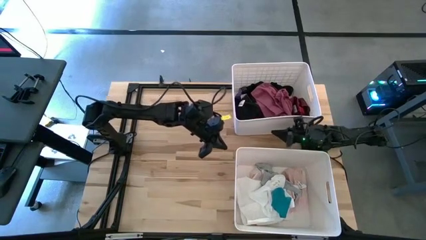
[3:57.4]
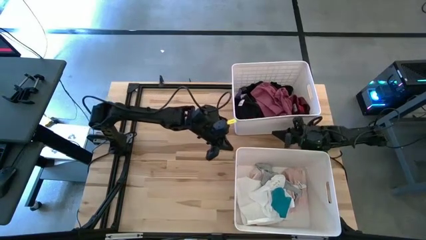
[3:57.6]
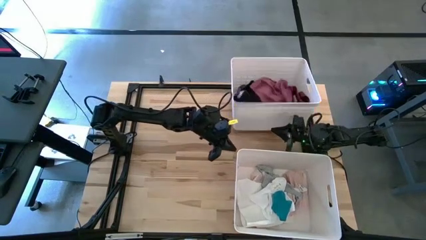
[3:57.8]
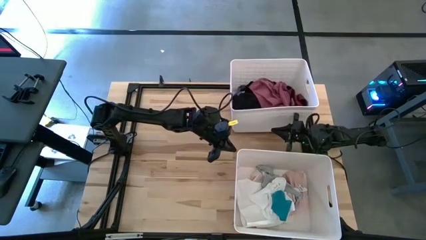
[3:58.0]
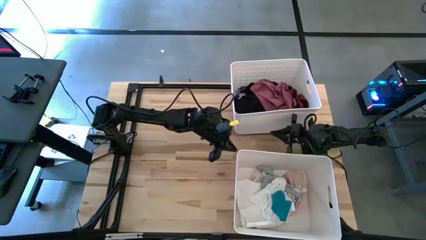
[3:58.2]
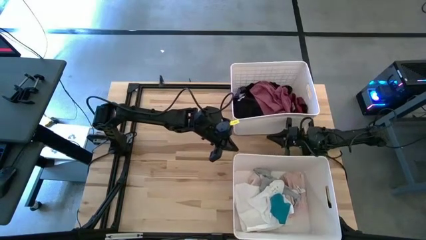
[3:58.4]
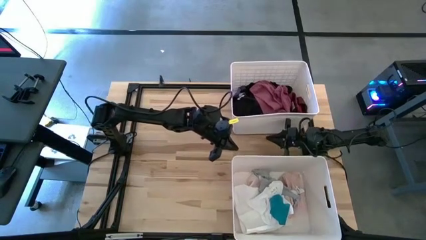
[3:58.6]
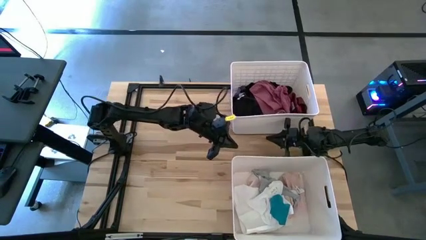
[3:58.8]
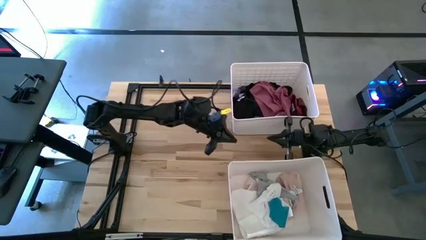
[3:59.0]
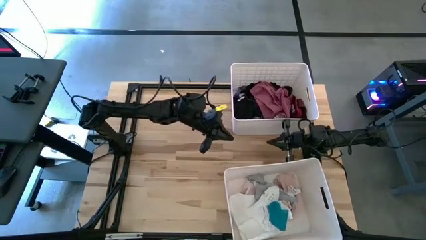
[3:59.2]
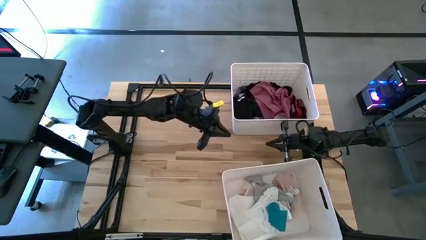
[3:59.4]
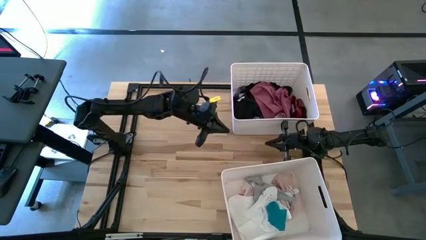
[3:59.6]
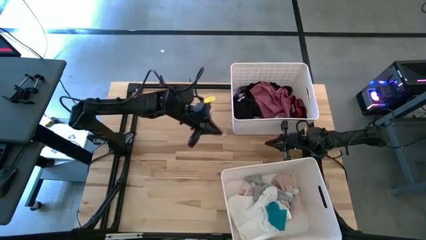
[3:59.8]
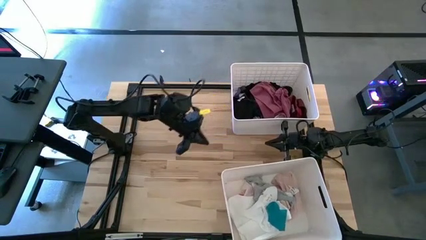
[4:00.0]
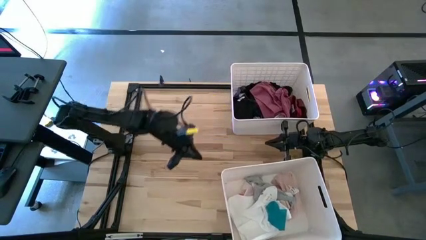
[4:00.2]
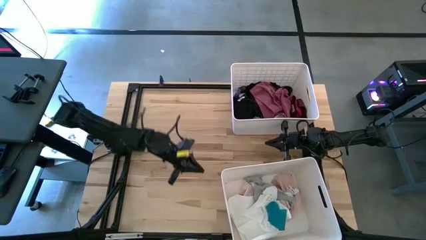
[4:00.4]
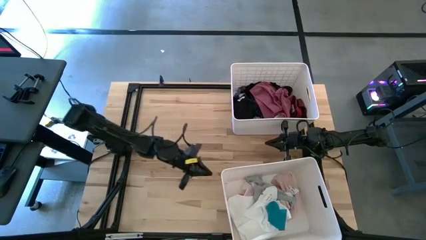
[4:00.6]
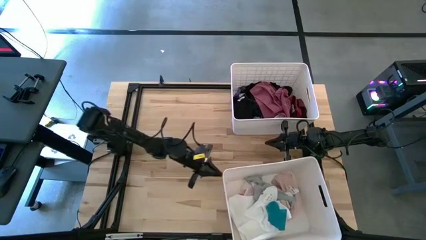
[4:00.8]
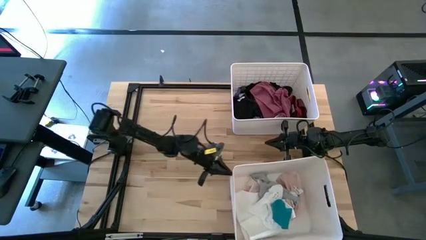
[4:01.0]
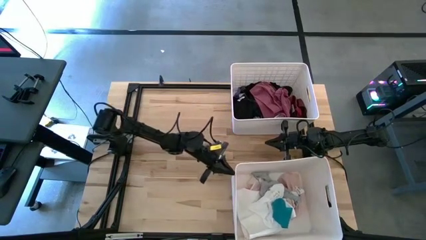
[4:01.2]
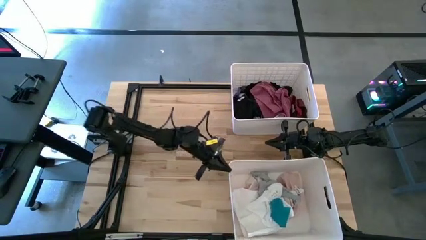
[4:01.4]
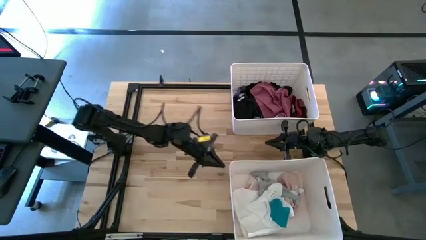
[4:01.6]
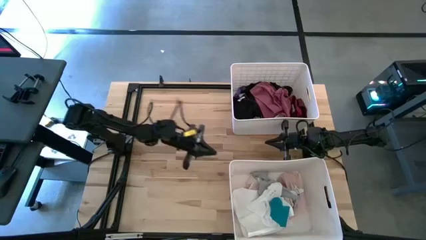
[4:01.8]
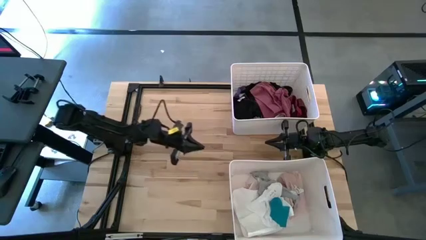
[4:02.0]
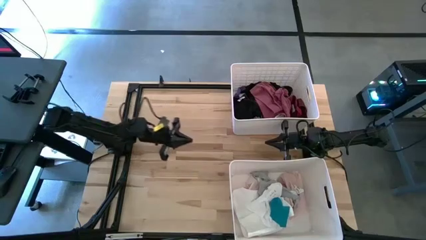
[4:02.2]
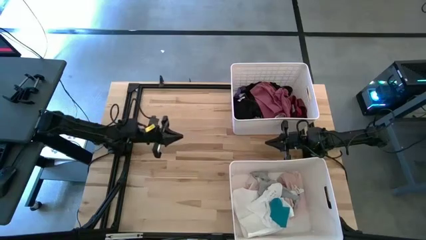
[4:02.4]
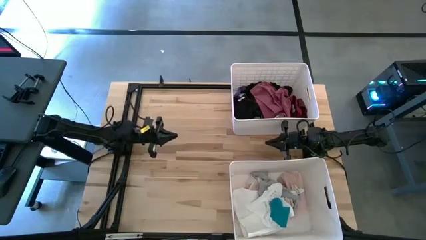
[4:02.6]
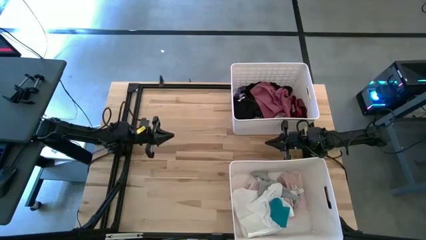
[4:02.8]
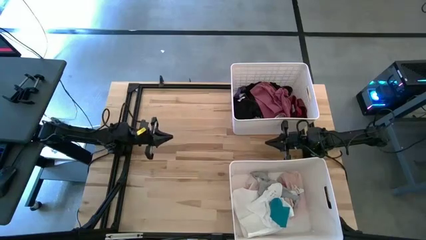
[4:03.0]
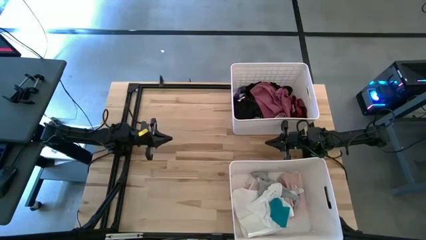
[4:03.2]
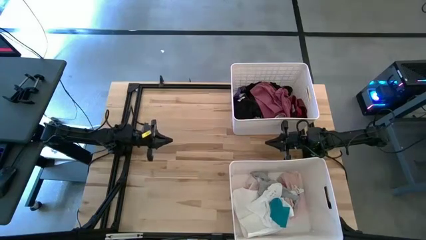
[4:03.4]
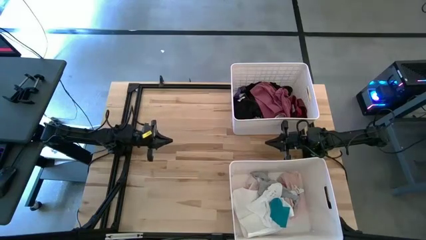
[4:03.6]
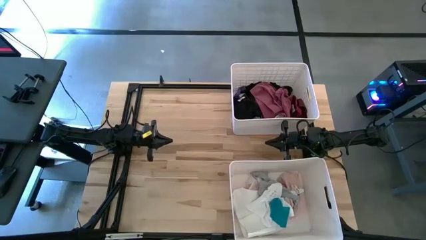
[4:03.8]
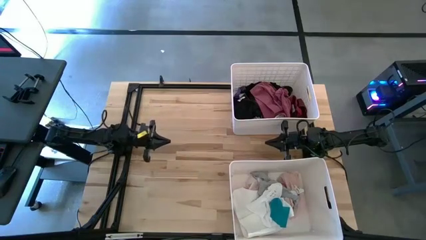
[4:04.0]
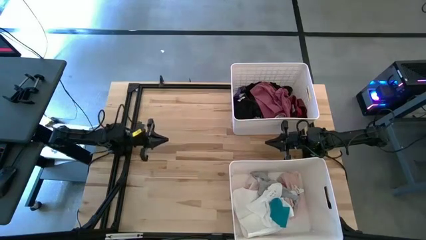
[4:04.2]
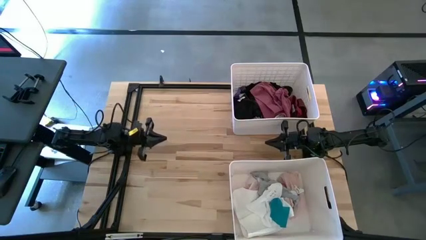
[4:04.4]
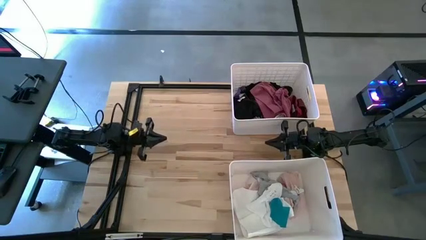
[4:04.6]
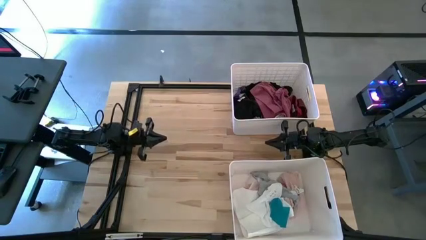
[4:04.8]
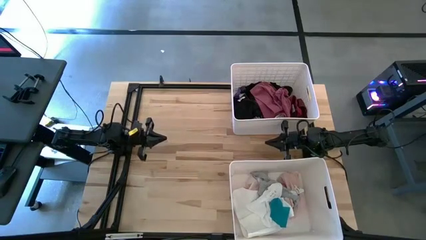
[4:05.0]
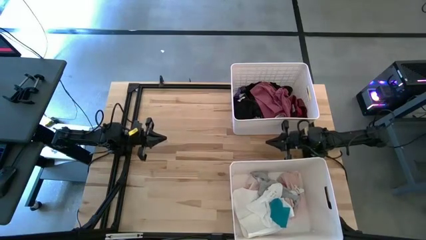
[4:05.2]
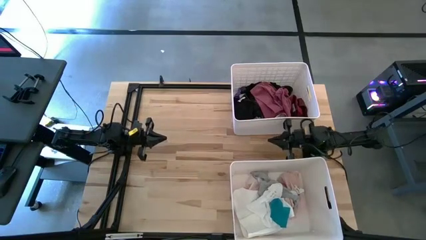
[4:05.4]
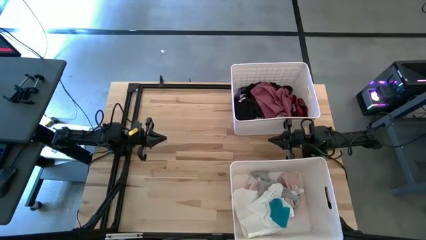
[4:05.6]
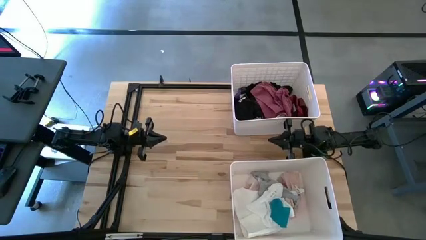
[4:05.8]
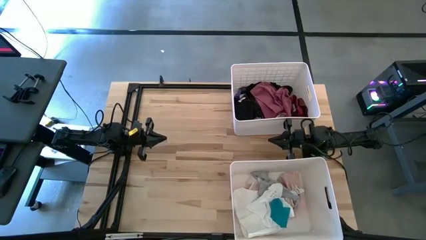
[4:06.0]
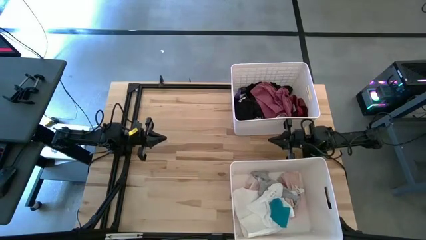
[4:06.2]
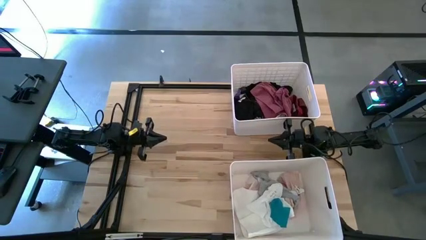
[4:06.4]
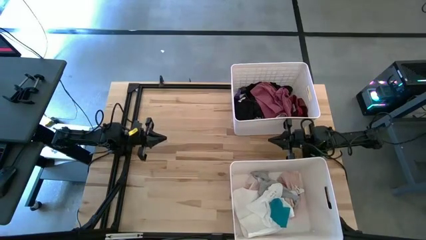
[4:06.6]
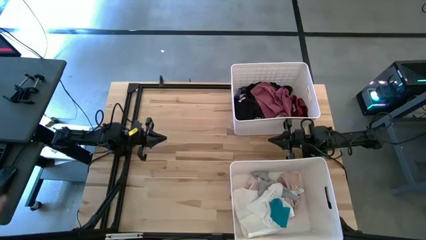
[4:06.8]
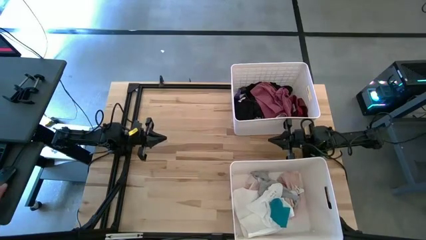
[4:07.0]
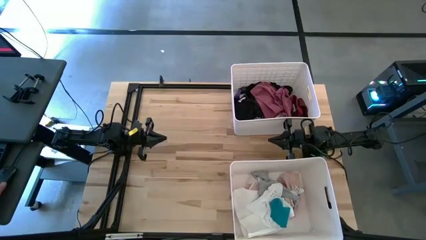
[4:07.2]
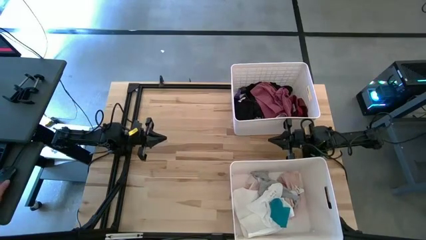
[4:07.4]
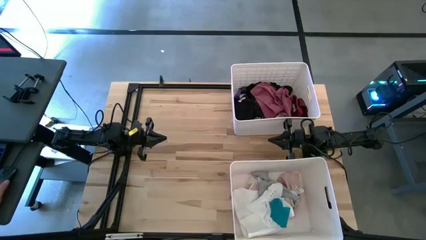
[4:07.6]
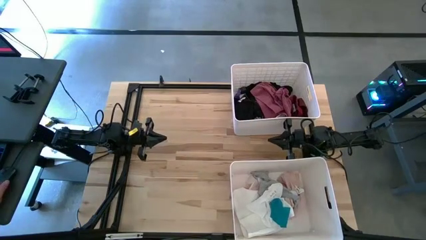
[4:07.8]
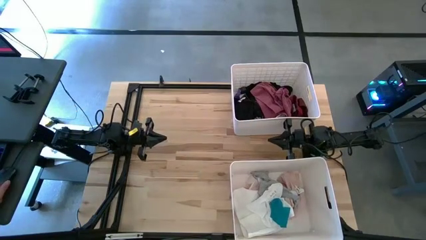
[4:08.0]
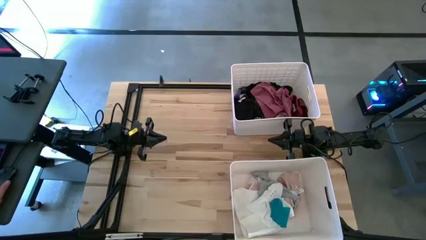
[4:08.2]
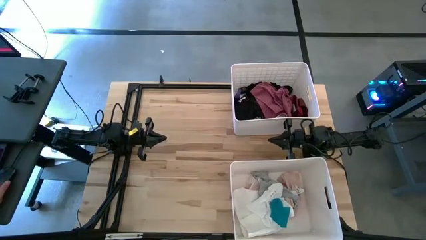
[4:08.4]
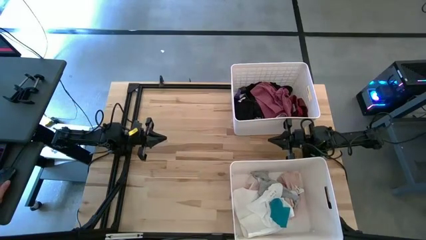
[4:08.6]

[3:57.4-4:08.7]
Task: Sort clothes
Return to home position
